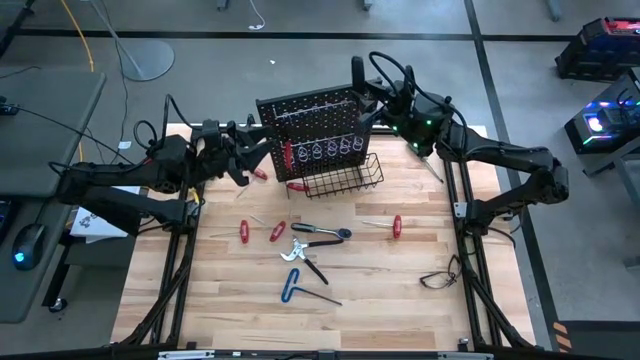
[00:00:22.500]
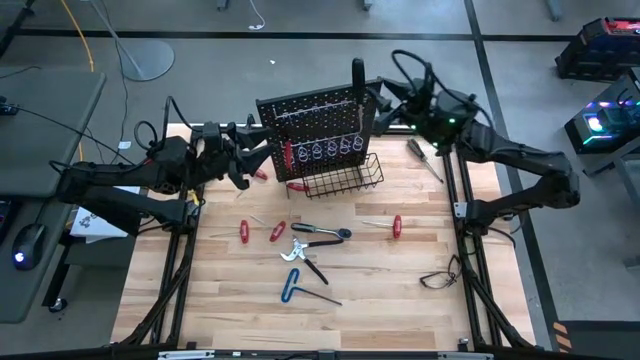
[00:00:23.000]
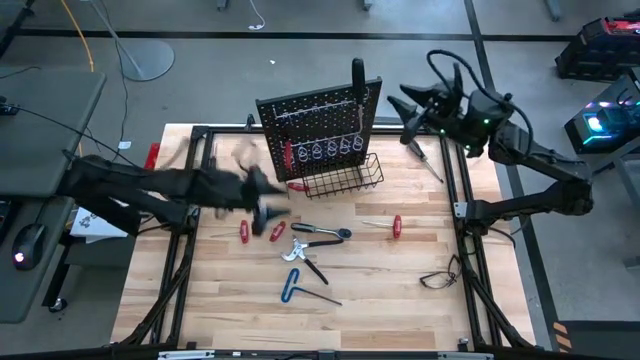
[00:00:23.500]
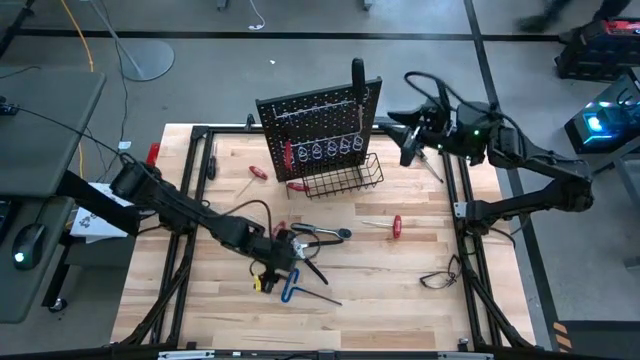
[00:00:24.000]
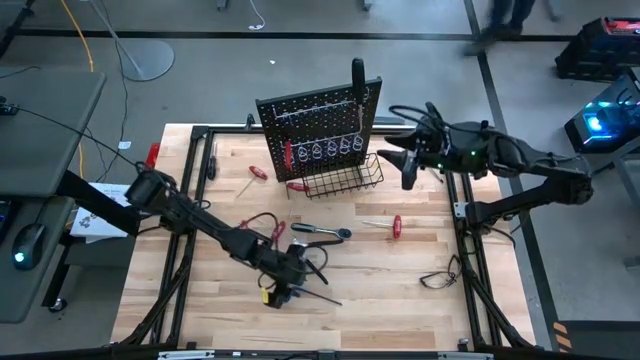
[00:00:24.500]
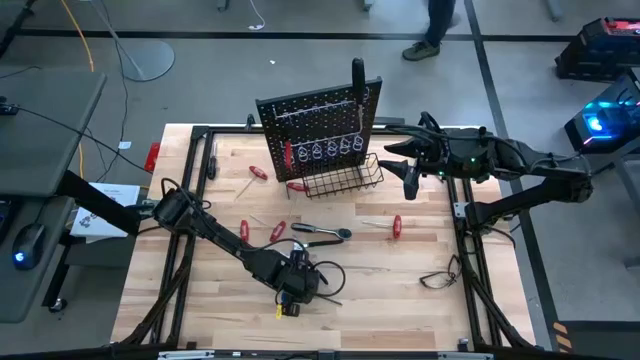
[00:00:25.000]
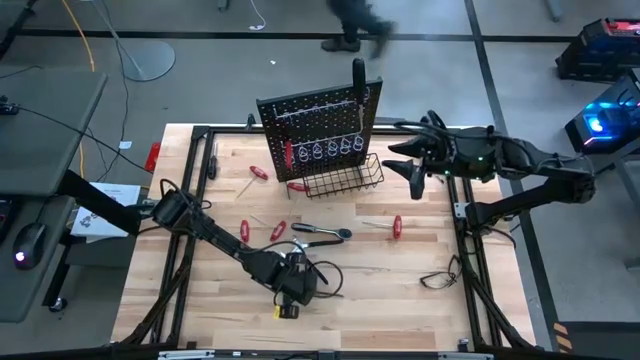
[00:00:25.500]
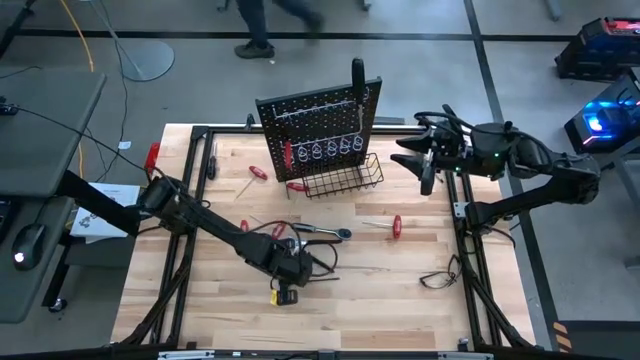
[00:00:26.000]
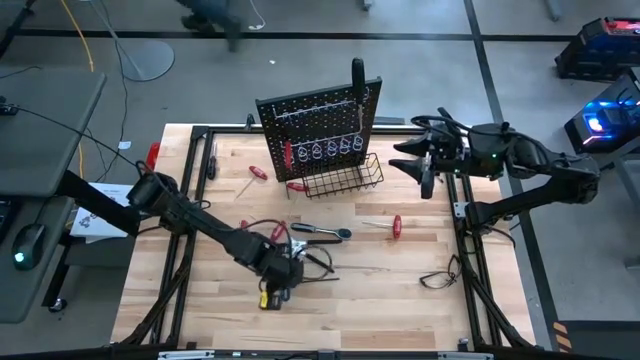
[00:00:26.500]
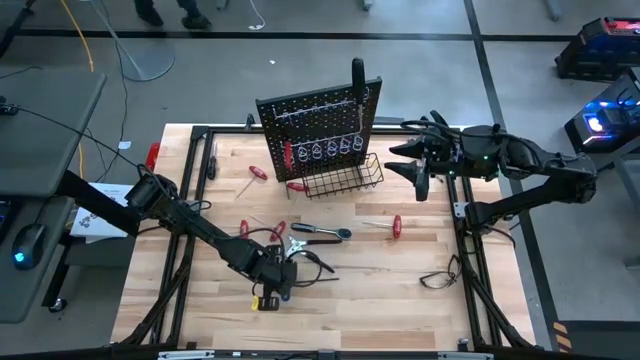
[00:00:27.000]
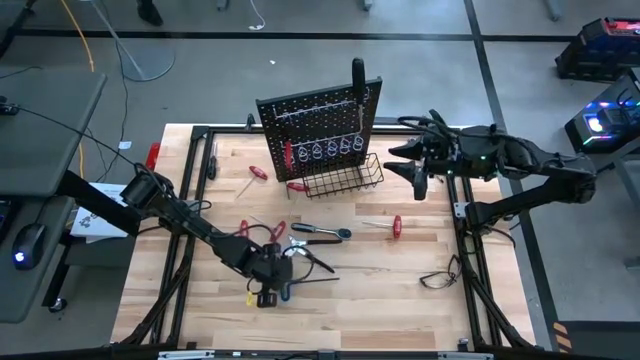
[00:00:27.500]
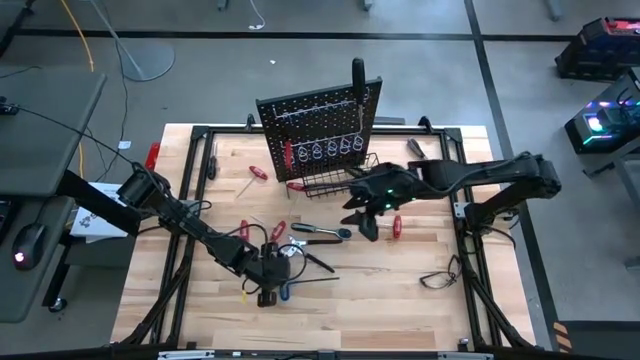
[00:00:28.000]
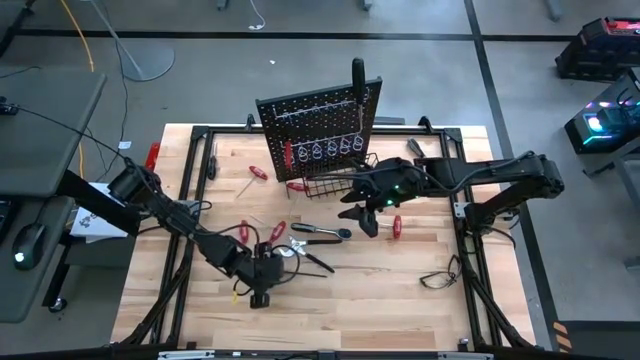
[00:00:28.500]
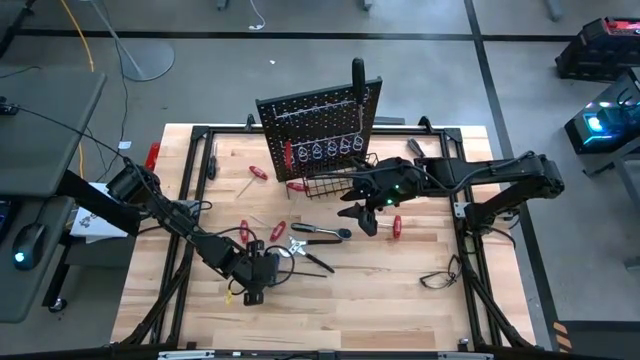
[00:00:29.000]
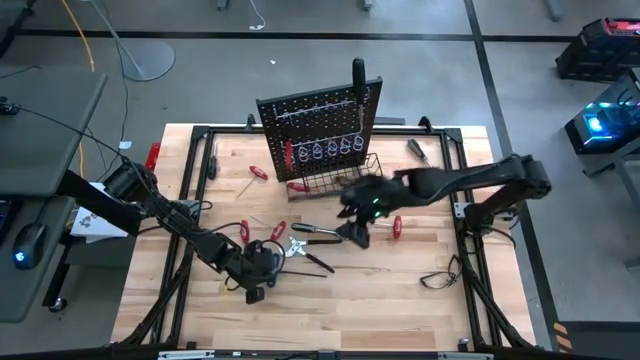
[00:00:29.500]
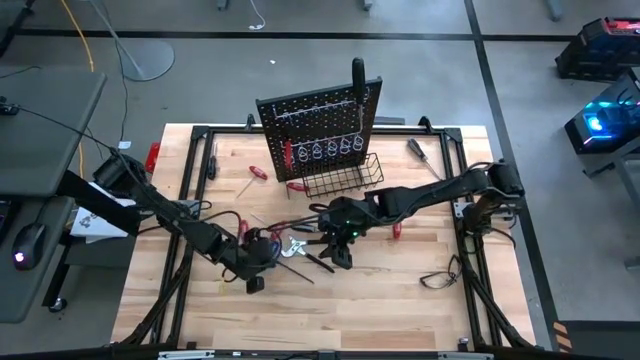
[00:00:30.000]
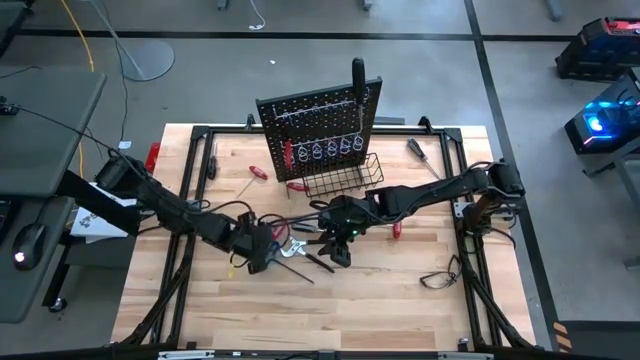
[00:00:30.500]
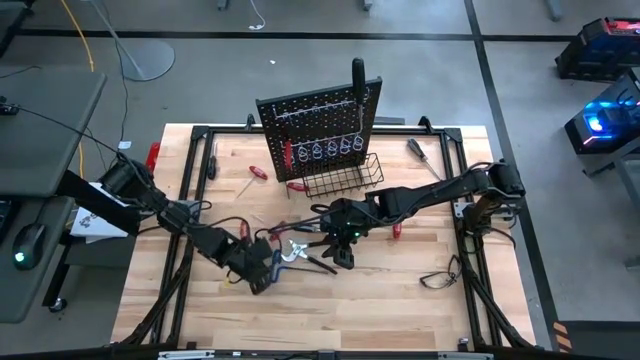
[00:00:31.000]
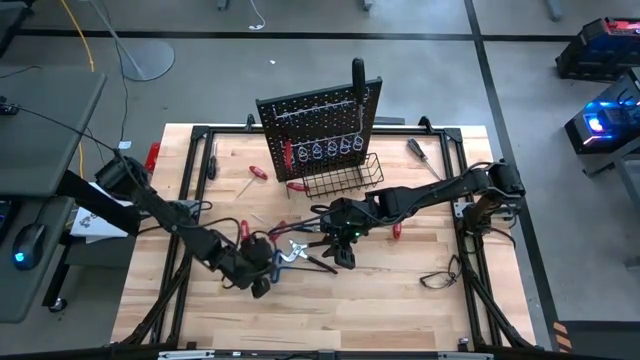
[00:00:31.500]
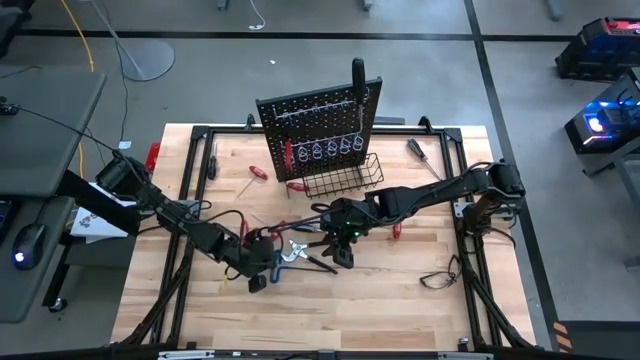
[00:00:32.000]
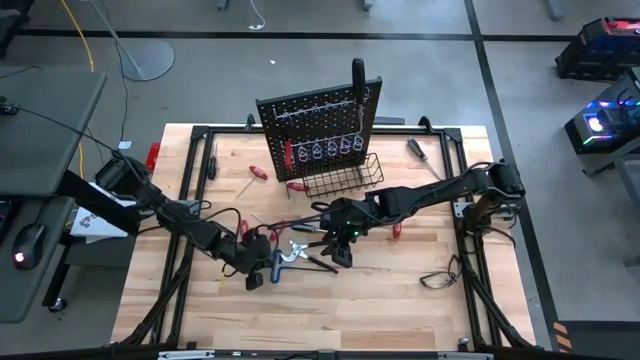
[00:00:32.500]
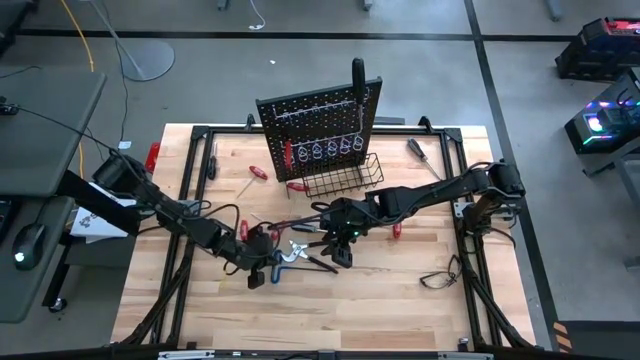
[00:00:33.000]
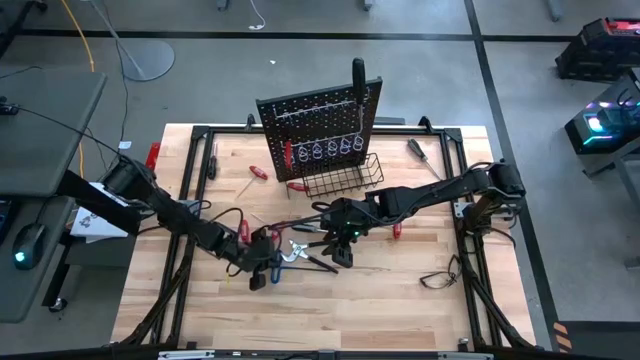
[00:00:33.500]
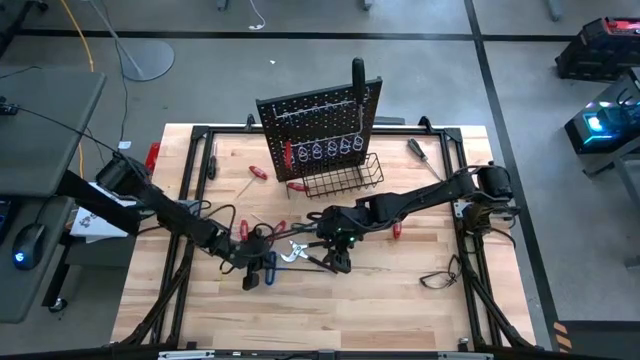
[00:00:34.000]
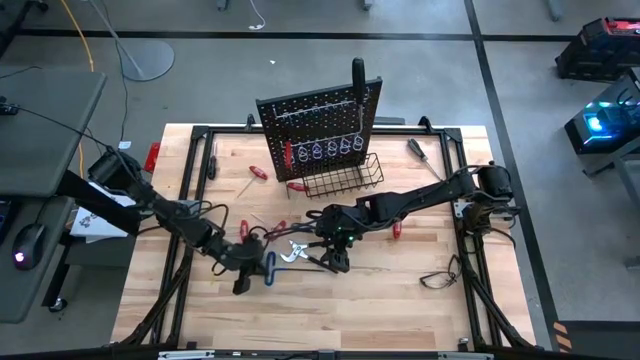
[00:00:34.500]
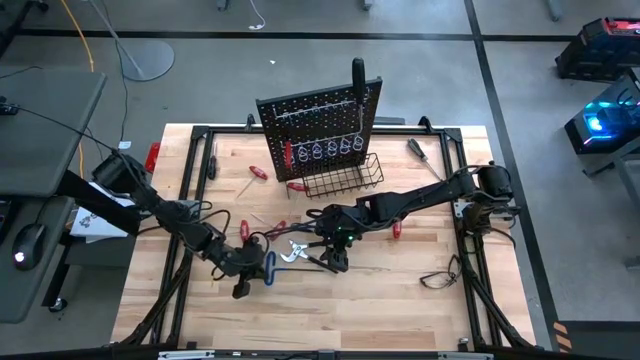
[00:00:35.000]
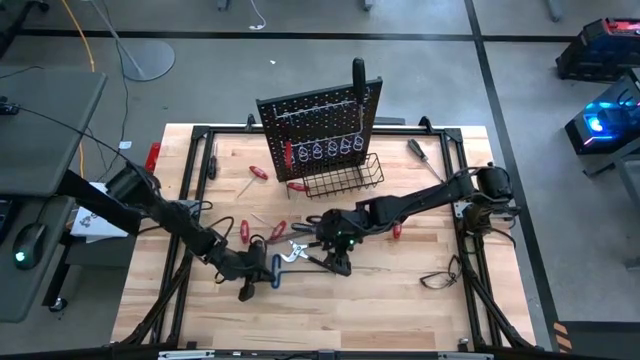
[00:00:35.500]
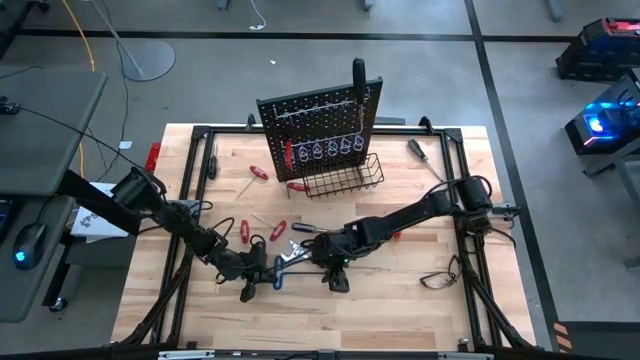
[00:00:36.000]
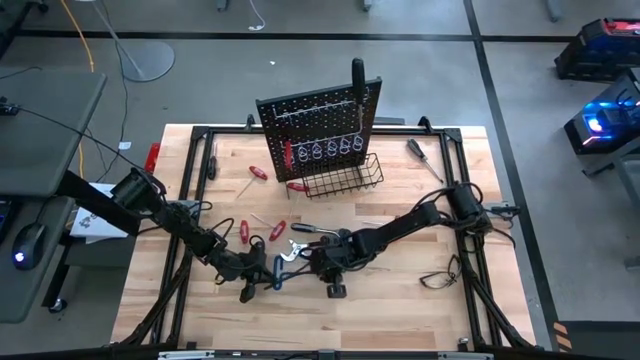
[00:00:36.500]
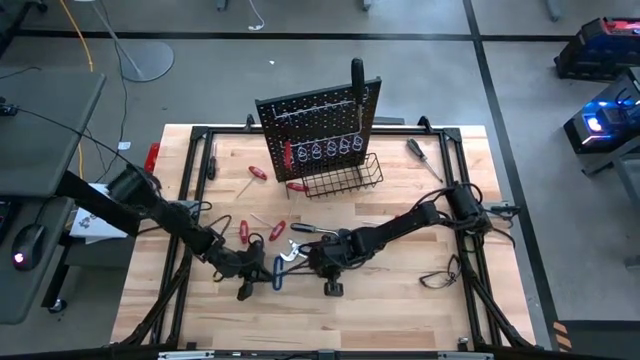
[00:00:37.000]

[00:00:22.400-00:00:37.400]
Task: Hang tools onto peg board
Hang the blue pick tool on the peg board

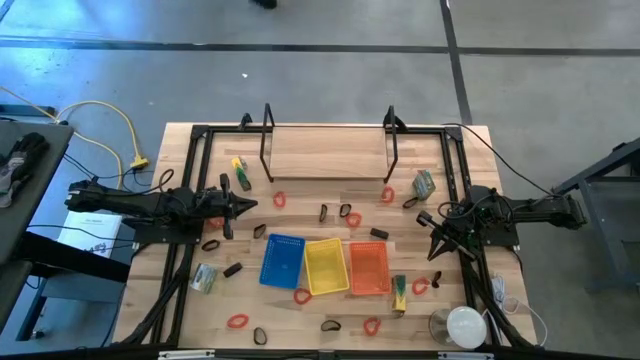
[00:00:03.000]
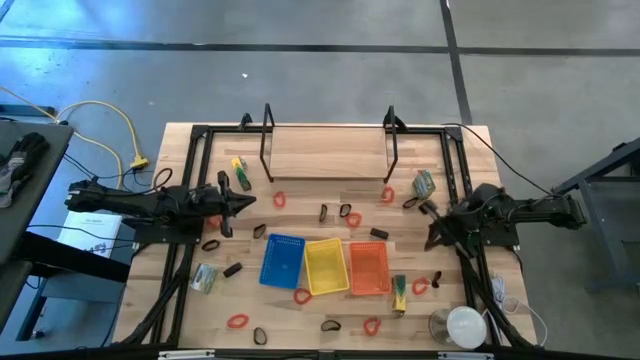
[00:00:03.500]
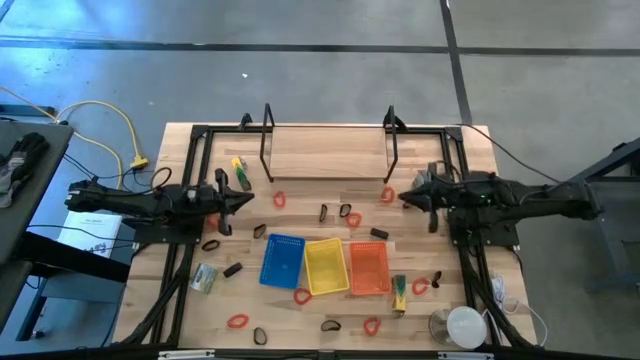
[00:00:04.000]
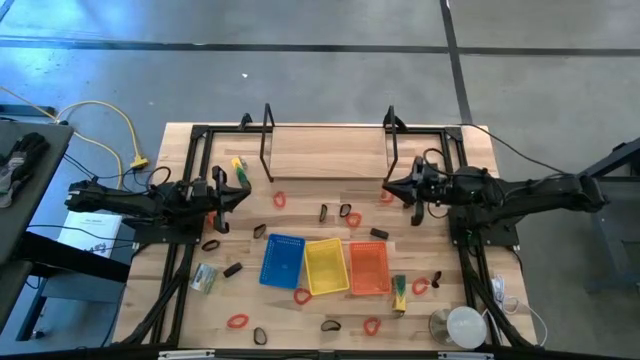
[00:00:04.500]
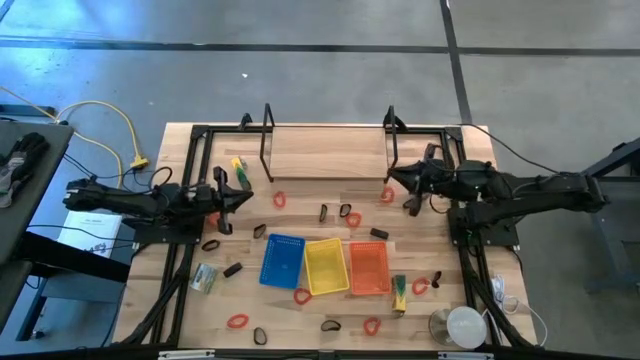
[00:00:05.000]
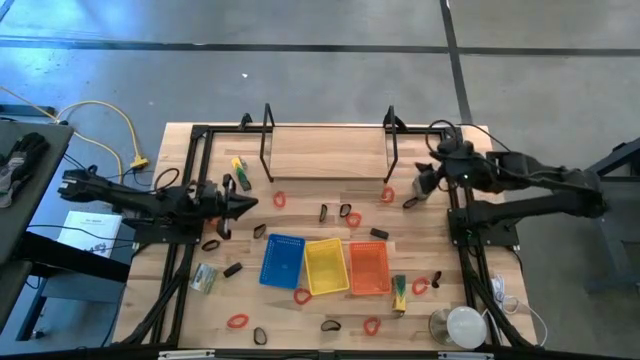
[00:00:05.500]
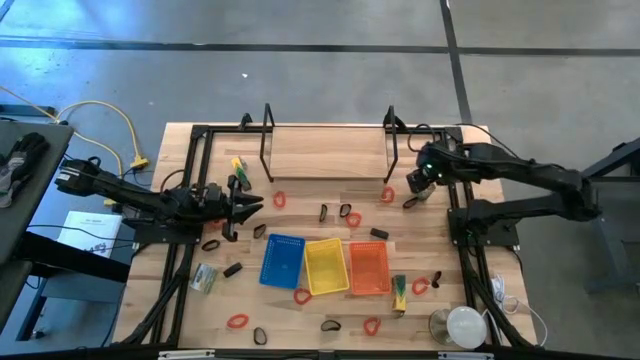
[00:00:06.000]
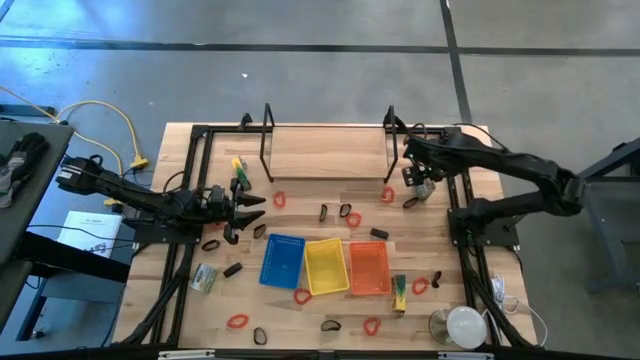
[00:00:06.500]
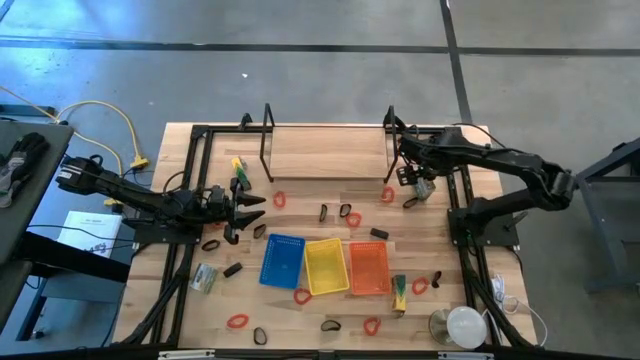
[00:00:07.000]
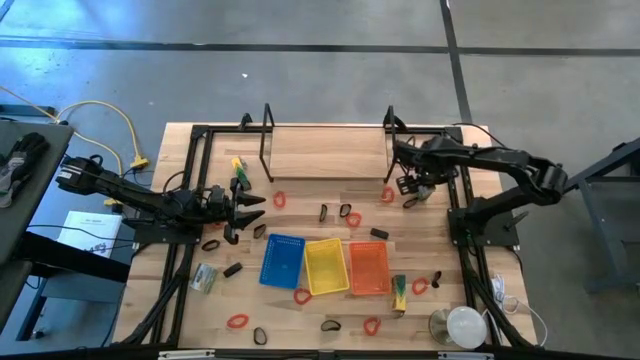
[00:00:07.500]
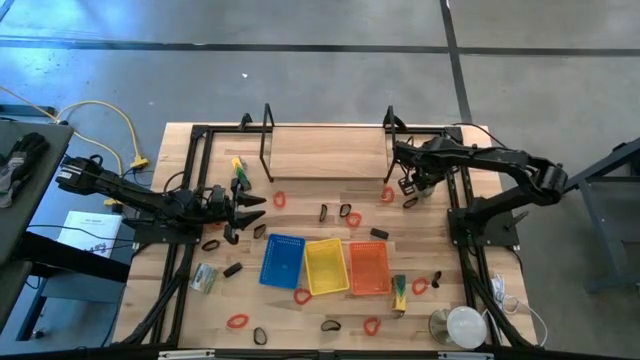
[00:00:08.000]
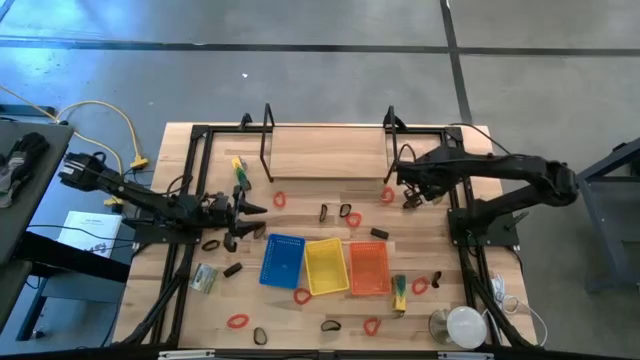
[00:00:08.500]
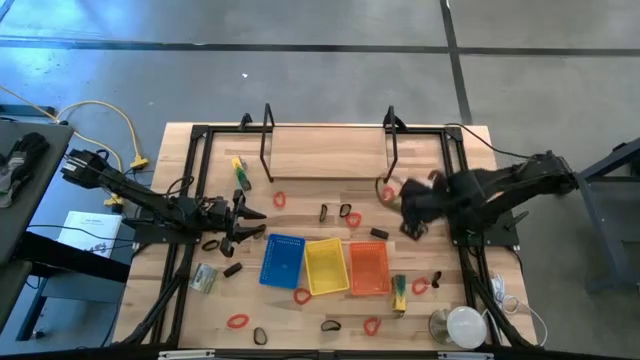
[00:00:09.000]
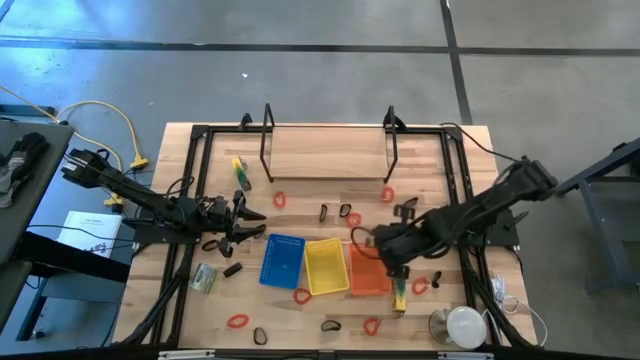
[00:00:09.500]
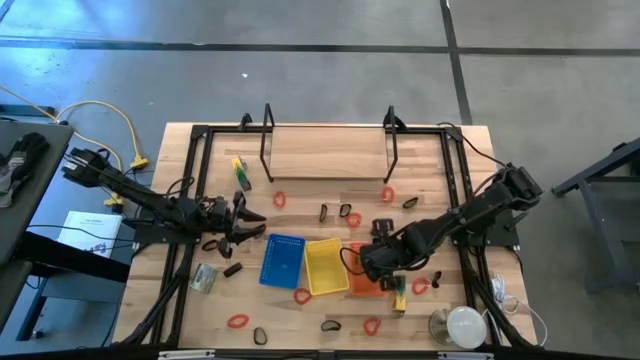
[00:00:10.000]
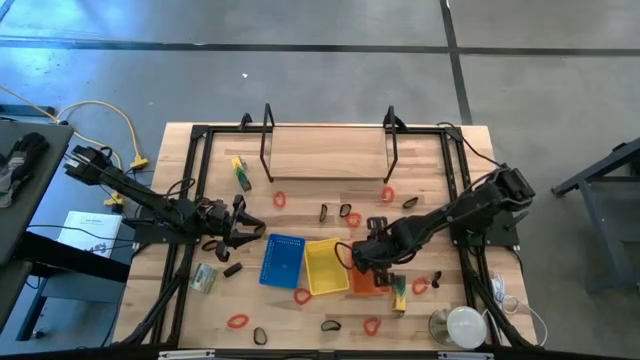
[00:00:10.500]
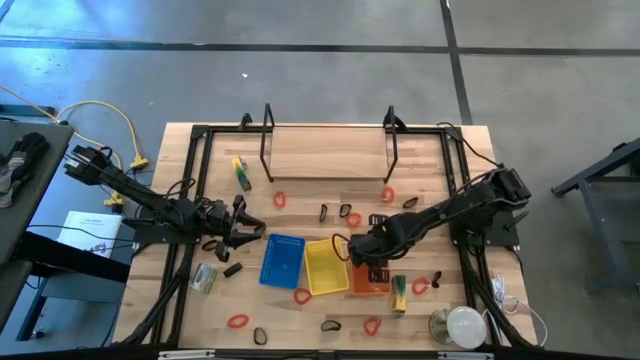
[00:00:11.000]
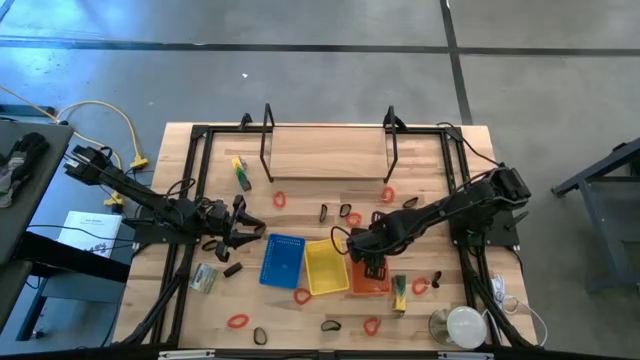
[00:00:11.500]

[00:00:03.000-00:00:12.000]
Task: Pick & Place Office Desk Supplies
Put the crayon box into the orange basket
